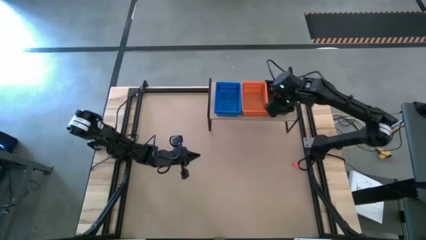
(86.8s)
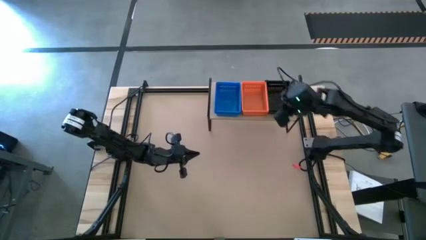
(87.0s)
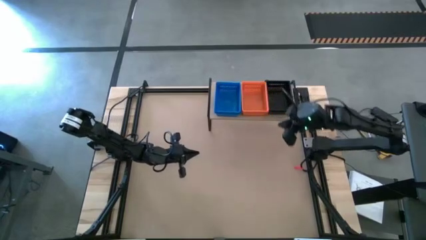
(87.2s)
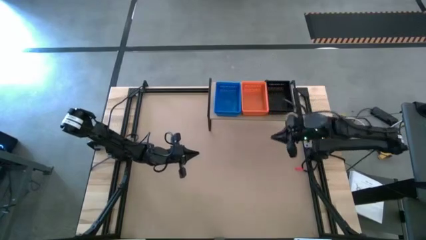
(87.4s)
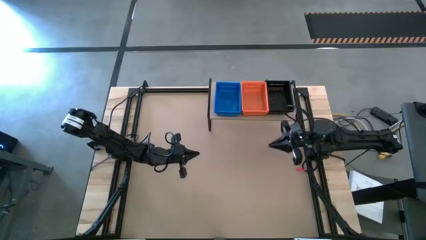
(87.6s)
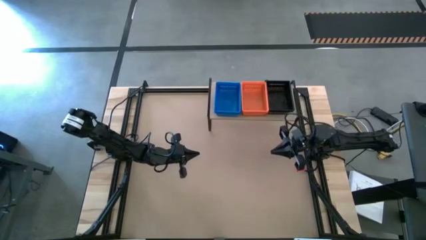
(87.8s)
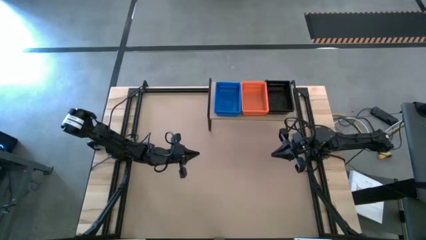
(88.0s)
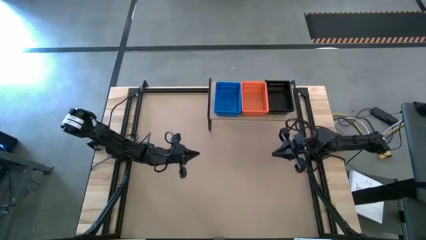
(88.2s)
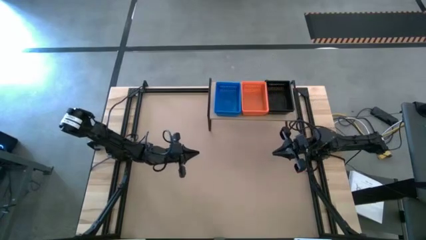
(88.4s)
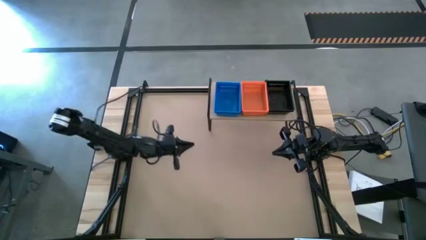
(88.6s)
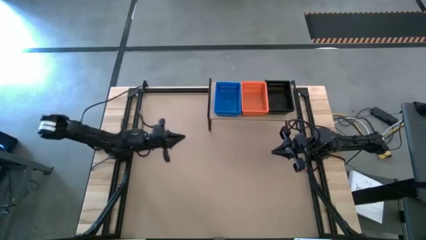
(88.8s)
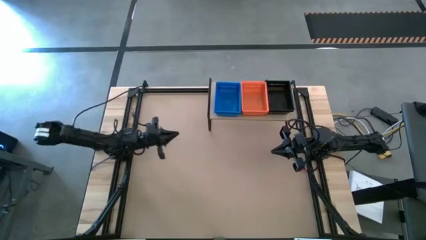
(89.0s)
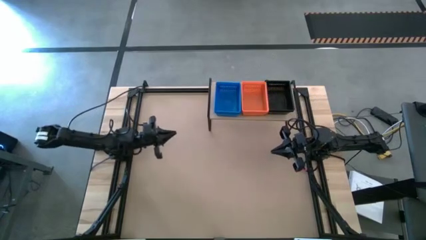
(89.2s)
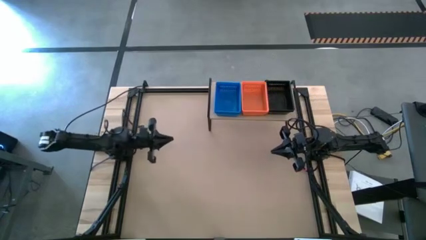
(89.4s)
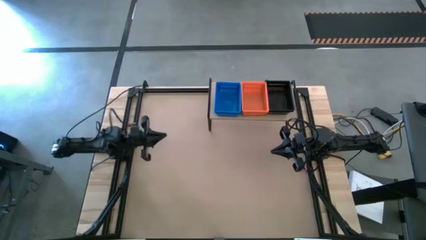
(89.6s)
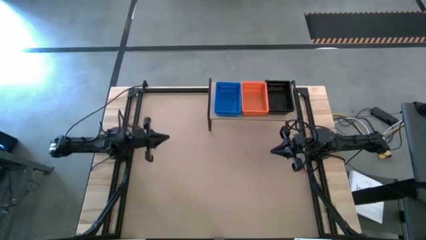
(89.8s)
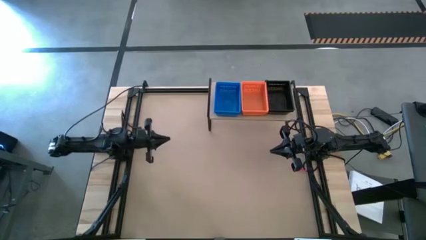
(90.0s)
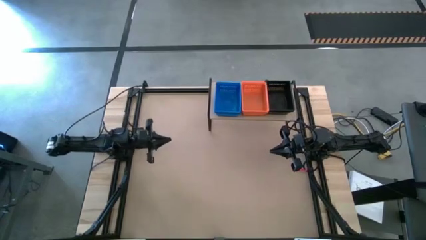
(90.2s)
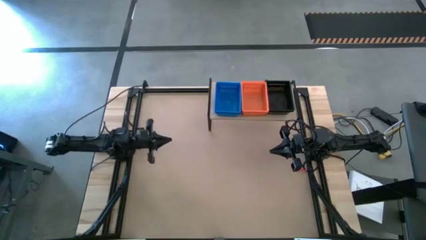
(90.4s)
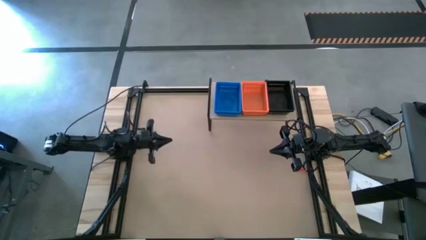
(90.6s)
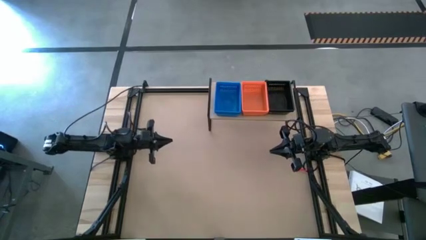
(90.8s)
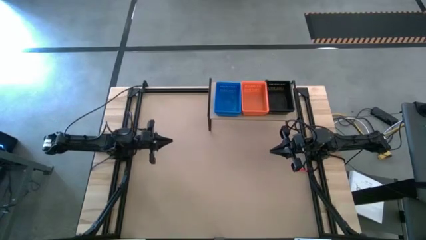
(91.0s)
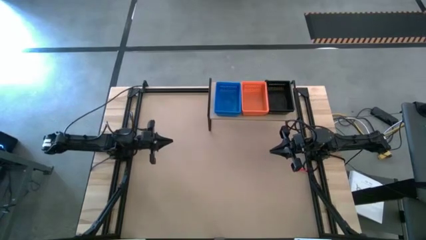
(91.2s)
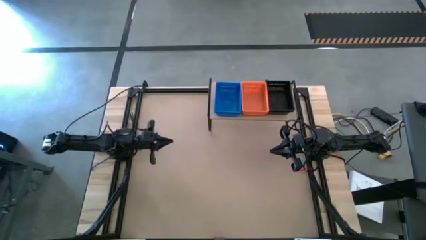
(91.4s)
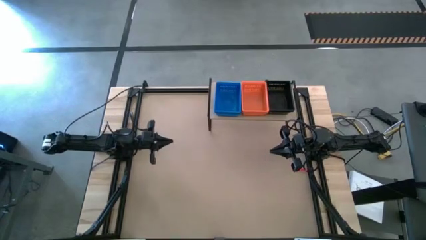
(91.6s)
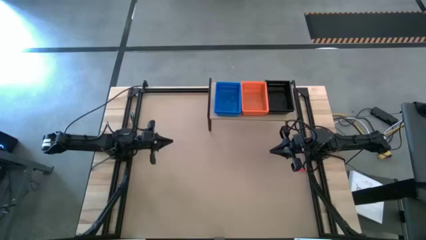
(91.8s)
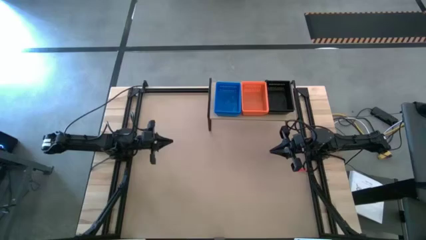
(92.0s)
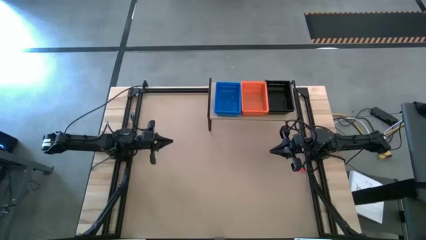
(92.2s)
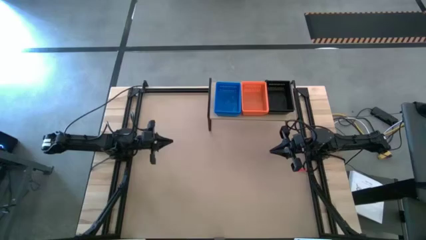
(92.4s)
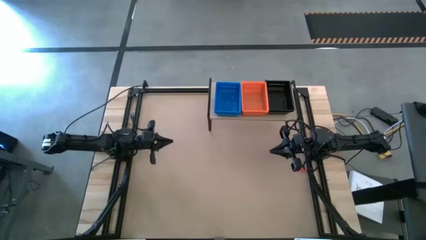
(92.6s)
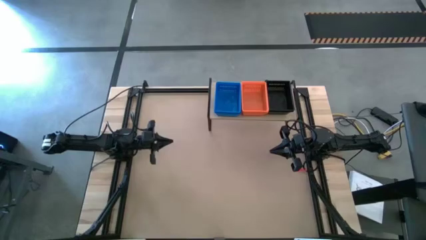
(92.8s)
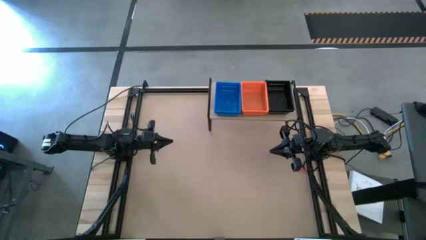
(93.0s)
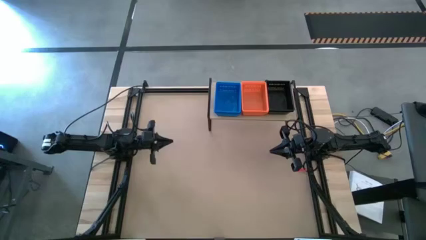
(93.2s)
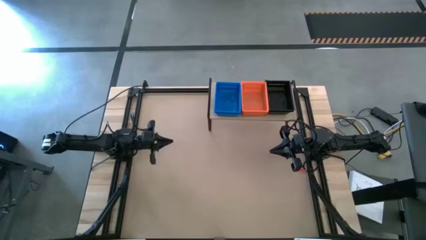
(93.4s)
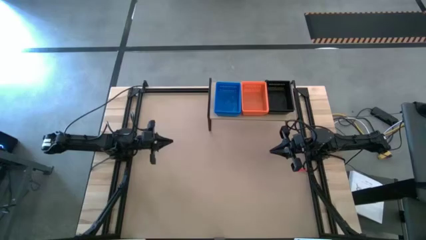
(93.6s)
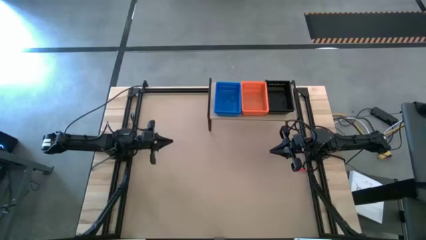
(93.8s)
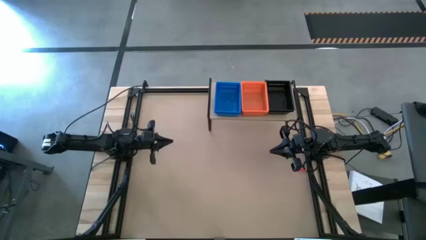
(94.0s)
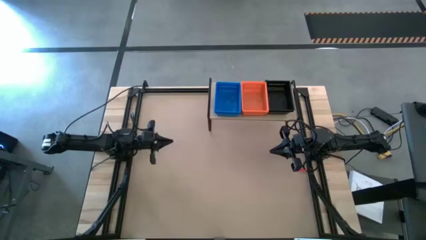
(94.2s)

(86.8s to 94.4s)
Task: Stack baskets on shelf by color
Return to Home Position

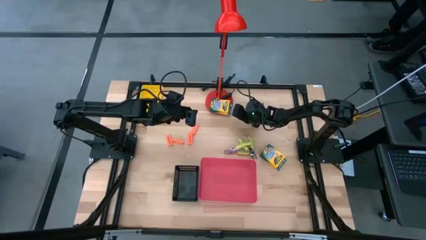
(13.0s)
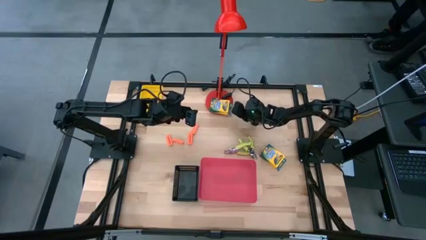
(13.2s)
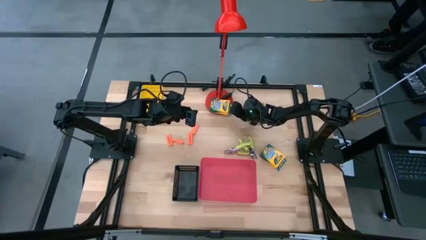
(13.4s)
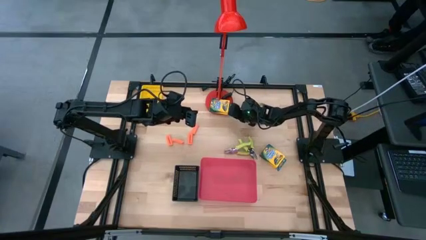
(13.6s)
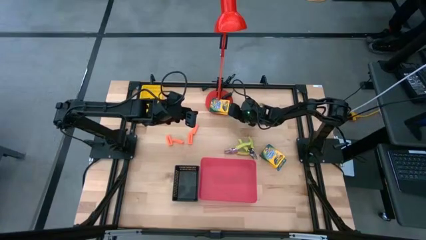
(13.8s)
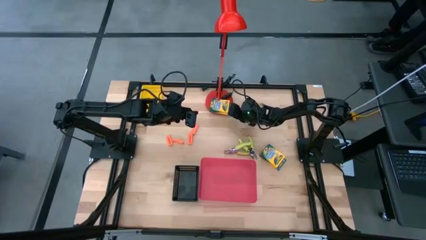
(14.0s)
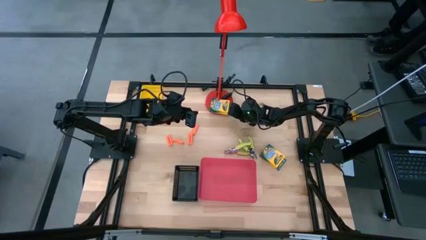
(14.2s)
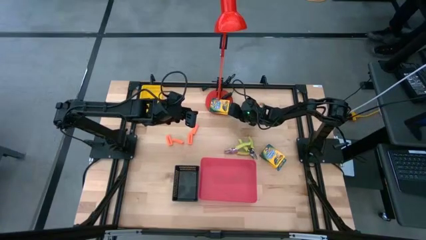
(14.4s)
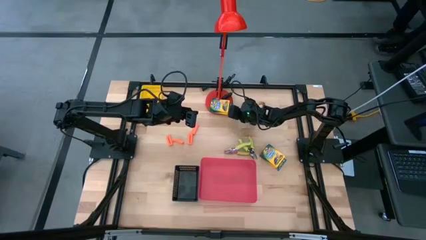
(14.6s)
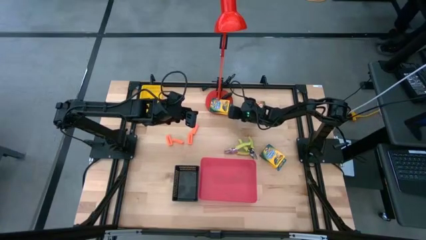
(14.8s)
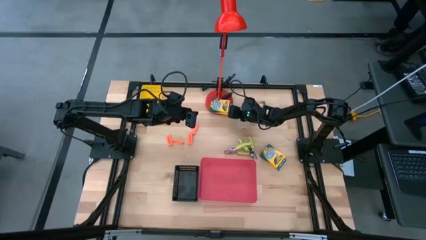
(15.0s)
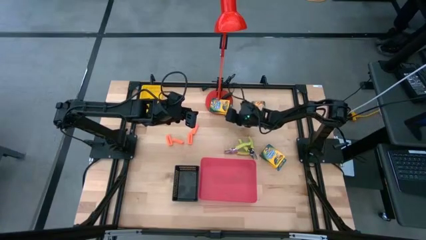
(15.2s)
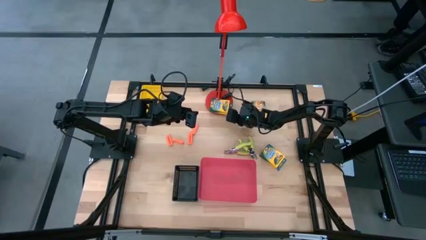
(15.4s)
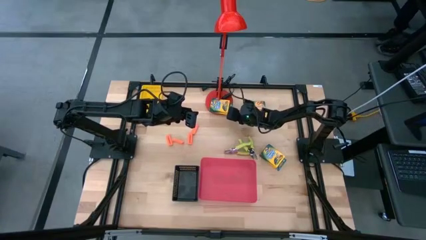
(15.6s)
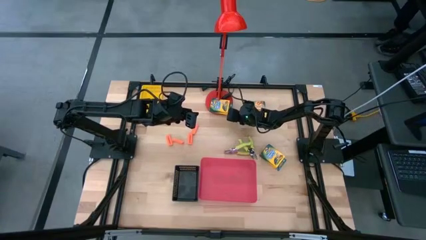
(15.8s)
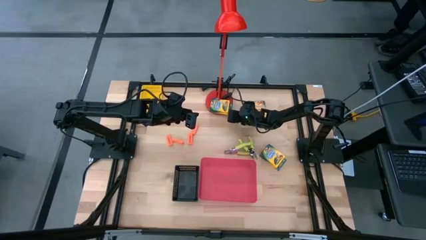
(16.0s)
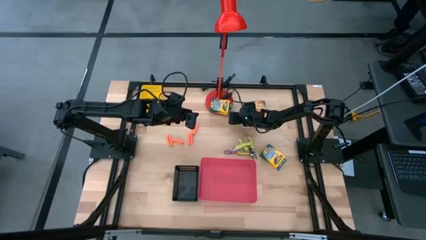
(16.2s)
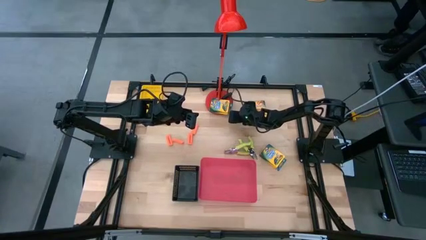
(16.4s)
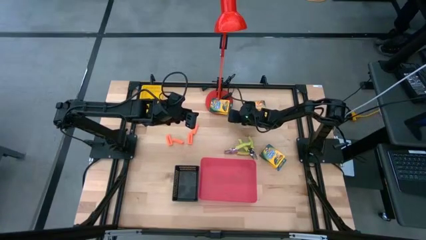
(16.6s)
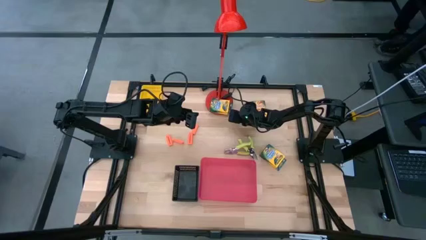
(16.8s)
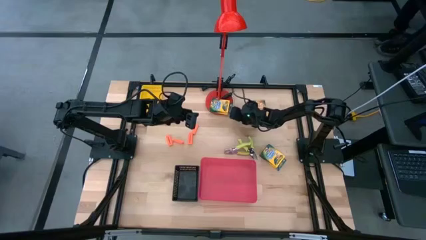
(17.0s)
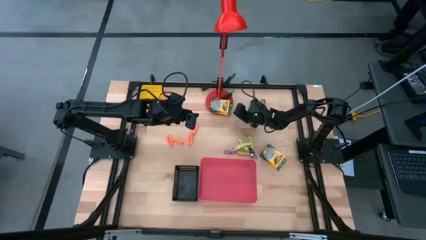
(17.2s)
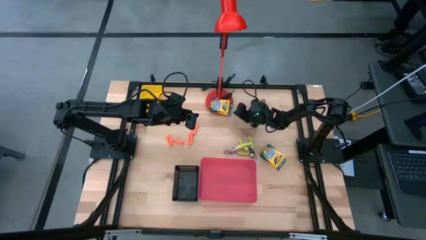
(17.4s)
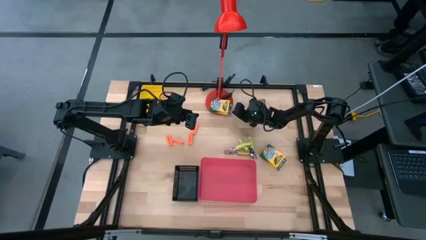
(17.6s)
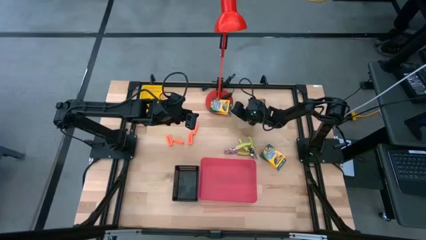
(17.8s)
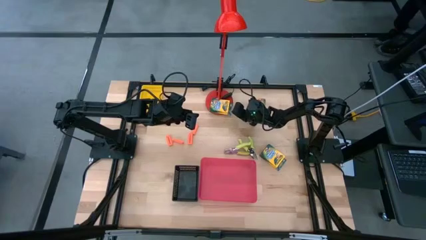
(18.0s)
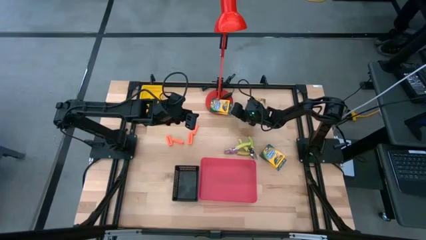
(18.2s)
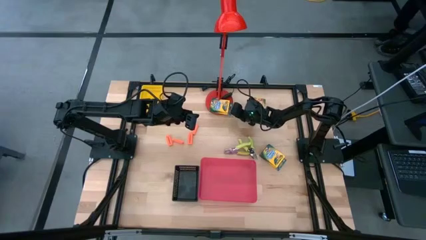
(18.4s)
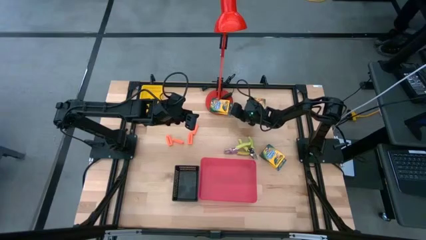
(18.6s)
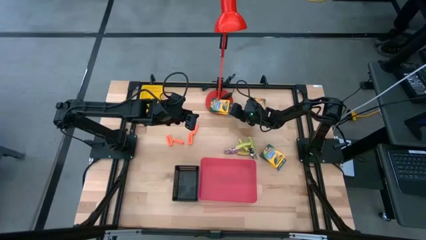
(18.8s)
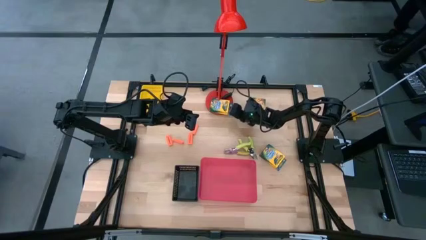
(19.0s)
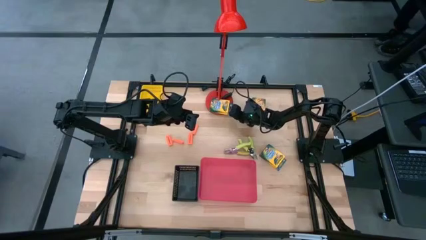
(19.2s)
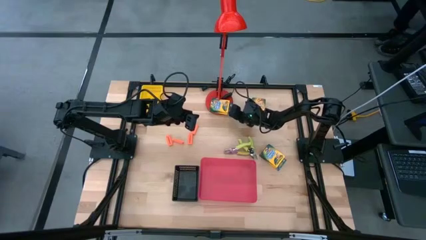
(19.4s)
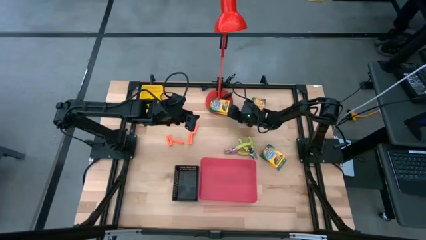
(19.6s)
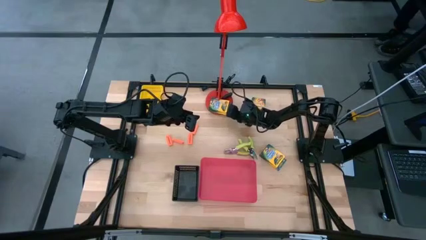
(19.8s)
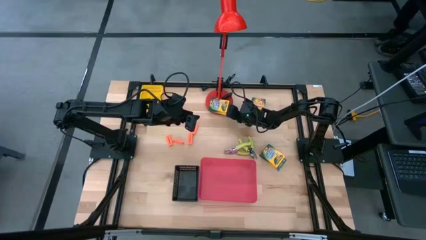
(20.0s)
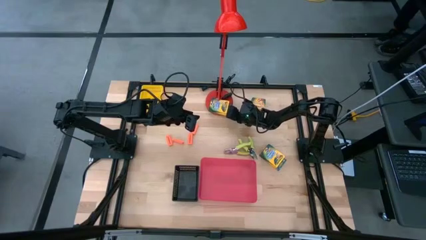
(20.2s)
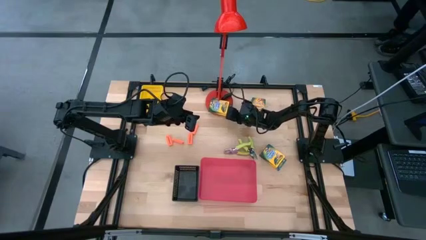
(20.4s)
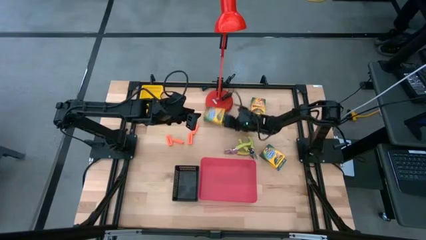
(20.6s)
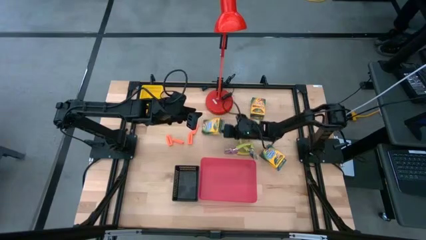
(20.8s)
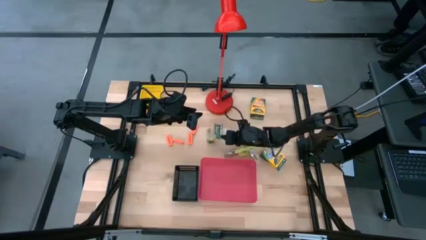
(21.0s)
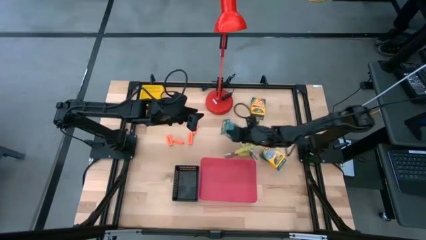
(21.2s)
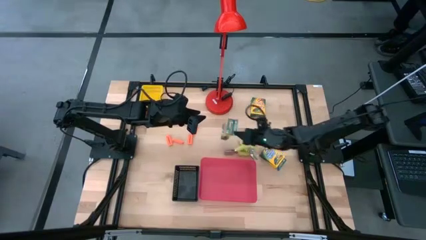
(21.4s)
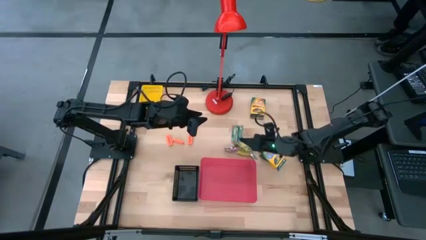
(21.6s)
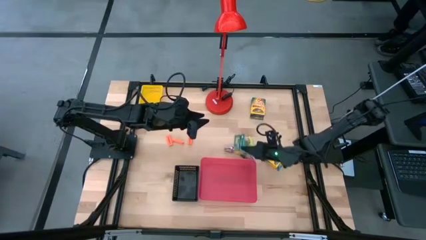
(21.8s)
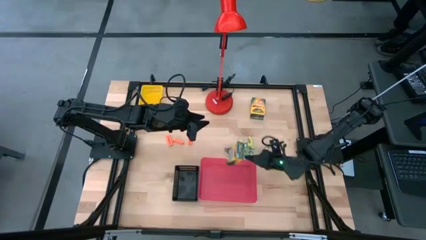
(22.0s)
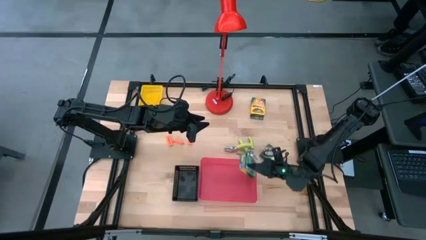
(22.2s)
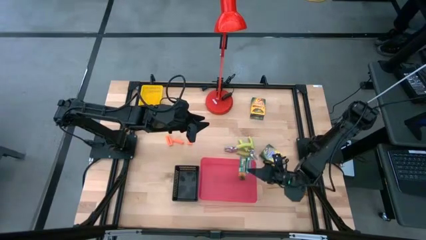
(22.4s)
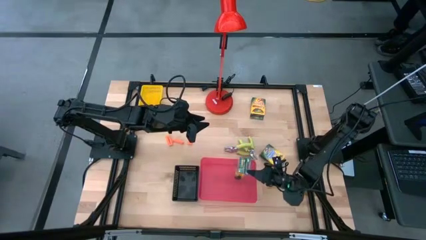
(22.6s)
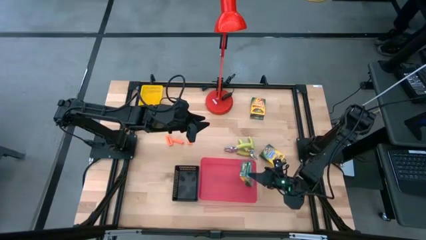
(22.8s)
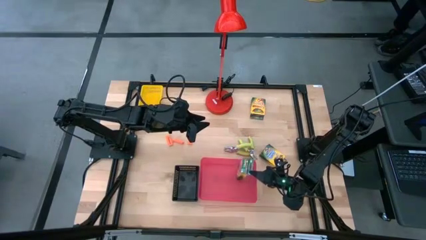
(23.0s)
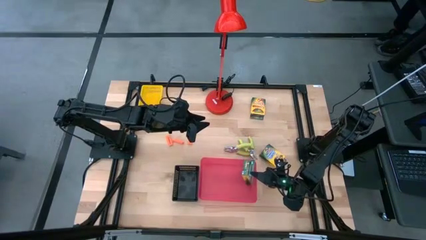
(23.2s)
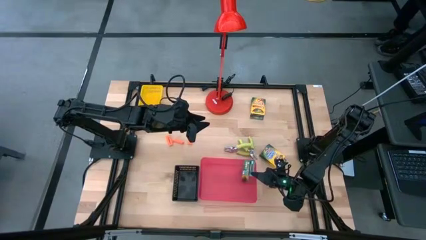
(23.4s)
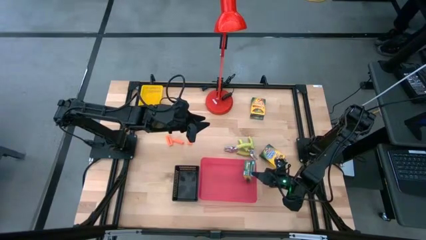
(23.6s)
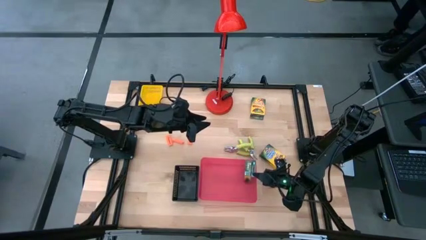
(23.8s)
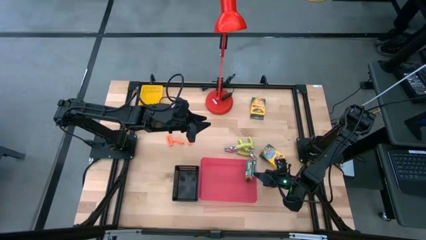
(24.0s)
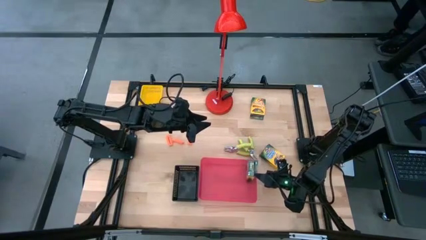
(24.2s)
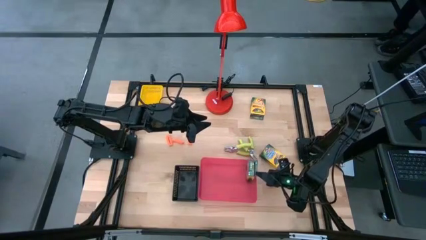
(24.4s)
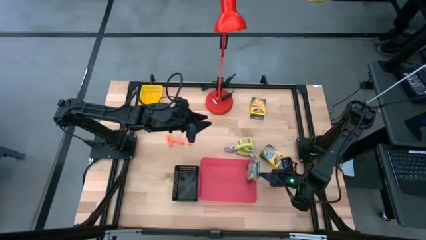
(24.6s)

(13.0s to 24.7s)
Task: Pick & Place School Supplies
Put the middle yellow crayon box into the red bin
